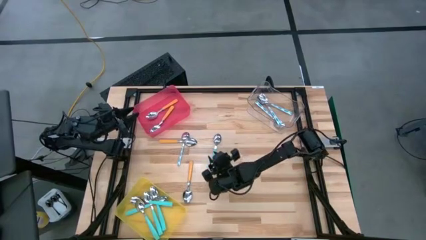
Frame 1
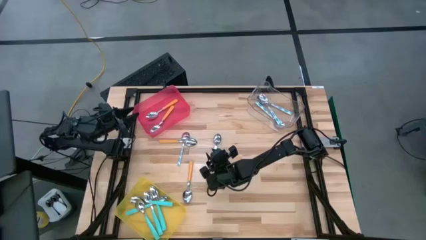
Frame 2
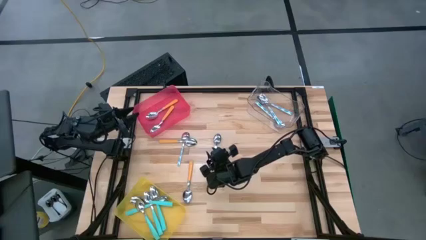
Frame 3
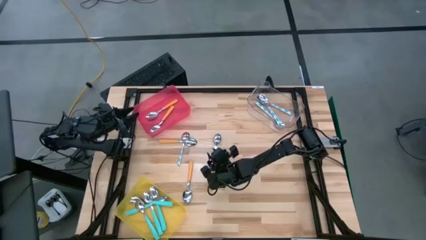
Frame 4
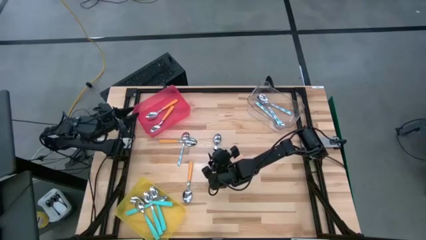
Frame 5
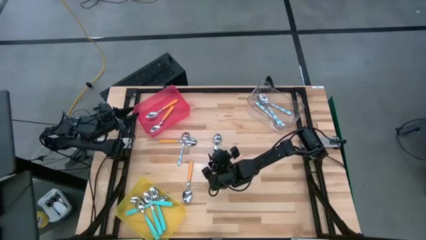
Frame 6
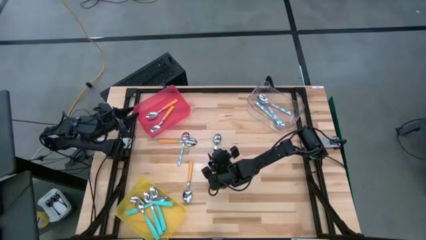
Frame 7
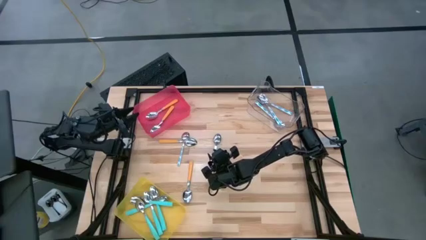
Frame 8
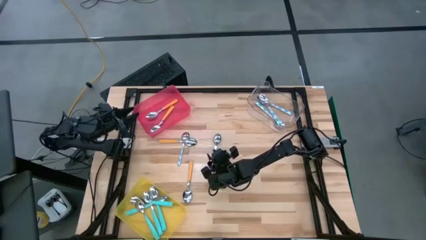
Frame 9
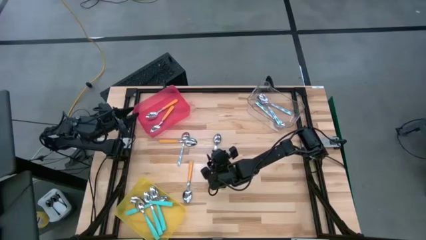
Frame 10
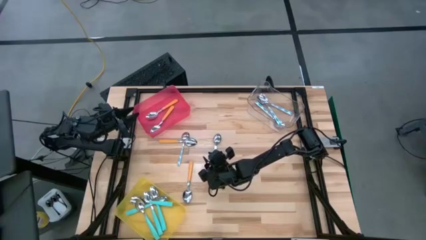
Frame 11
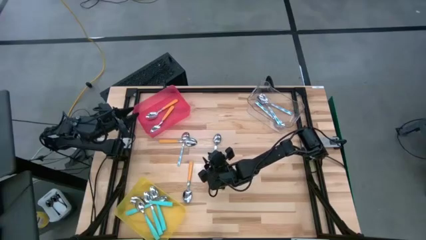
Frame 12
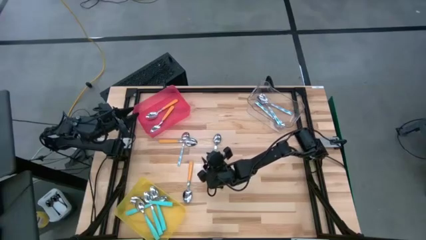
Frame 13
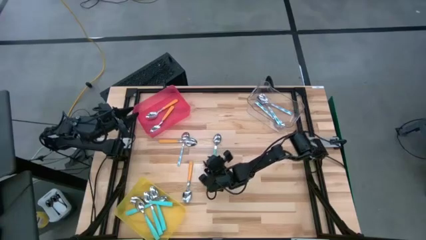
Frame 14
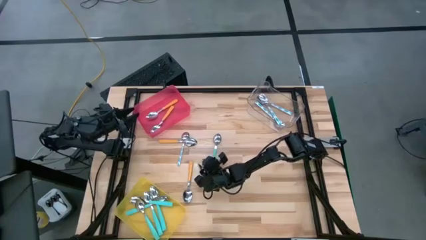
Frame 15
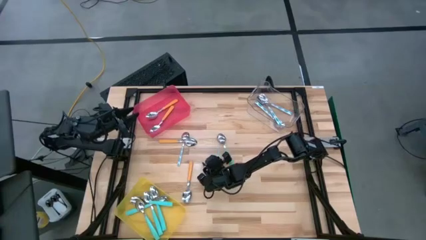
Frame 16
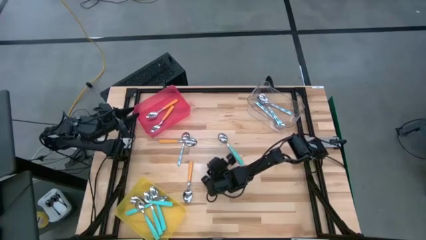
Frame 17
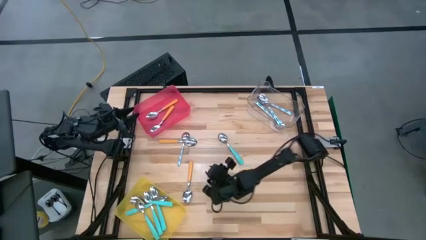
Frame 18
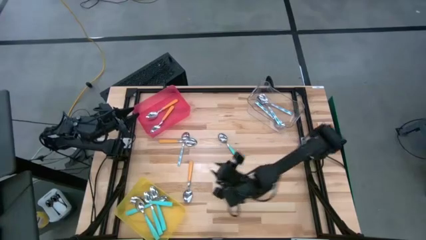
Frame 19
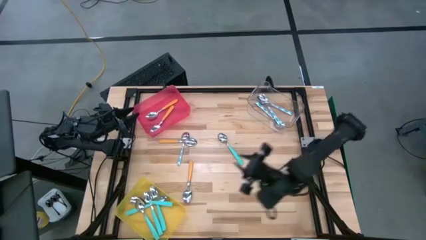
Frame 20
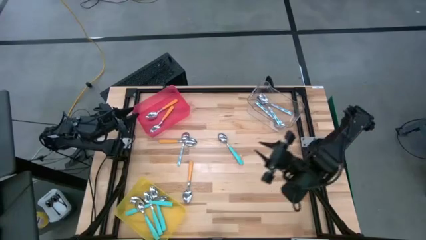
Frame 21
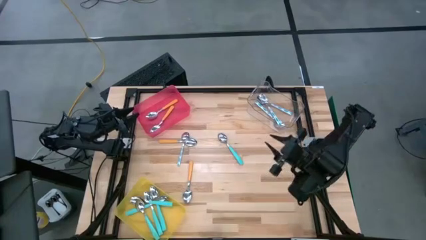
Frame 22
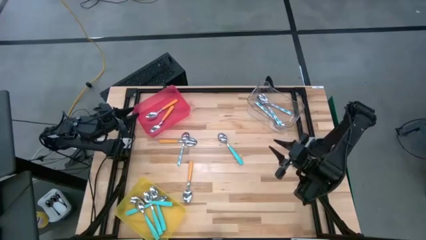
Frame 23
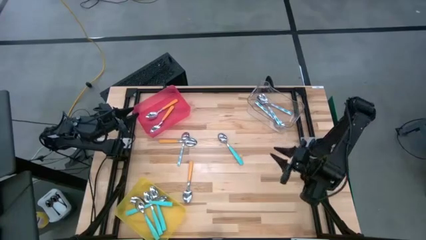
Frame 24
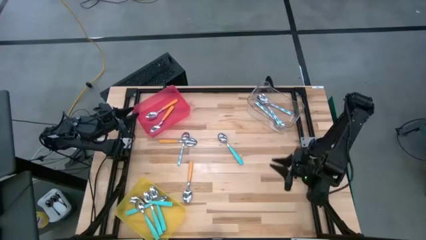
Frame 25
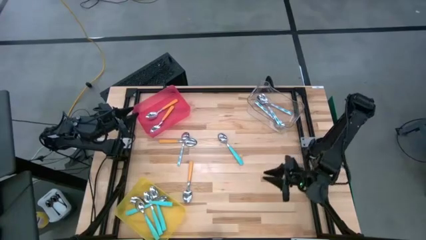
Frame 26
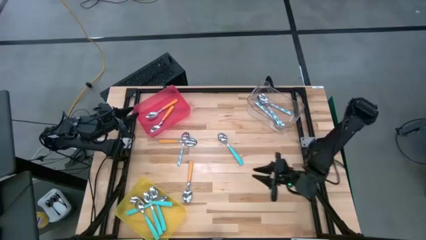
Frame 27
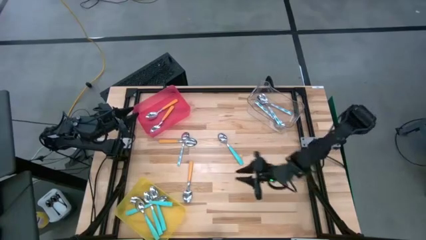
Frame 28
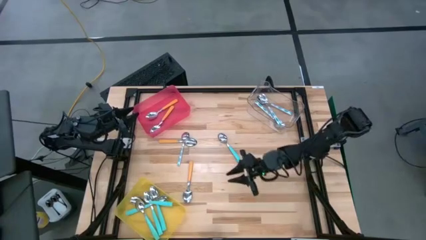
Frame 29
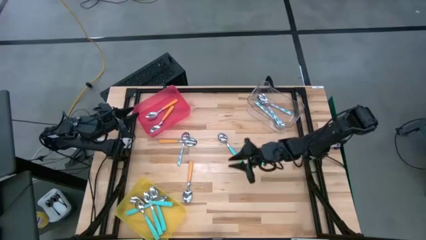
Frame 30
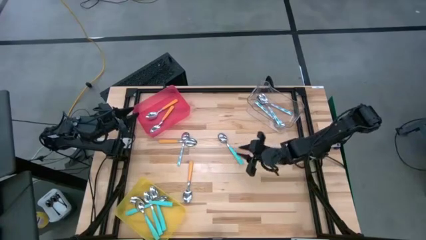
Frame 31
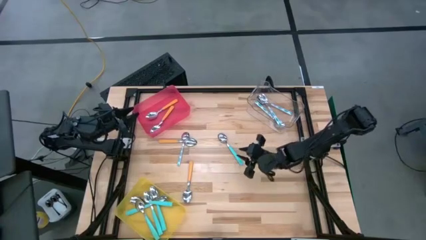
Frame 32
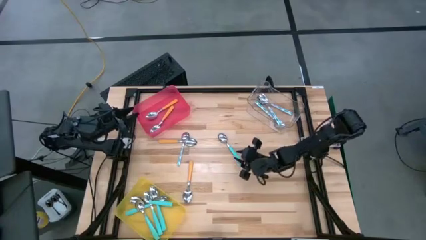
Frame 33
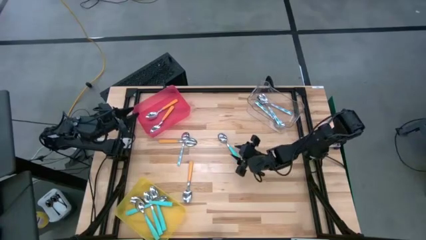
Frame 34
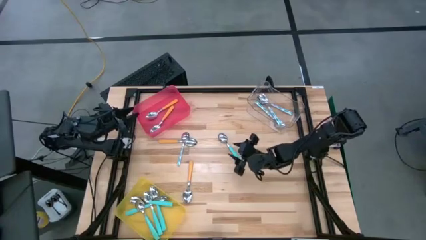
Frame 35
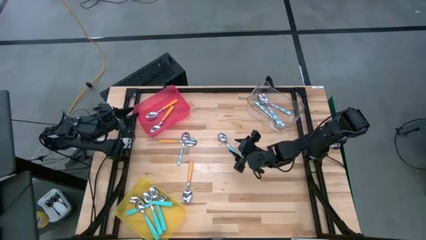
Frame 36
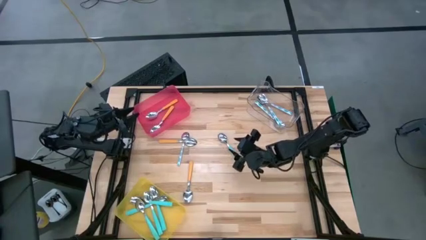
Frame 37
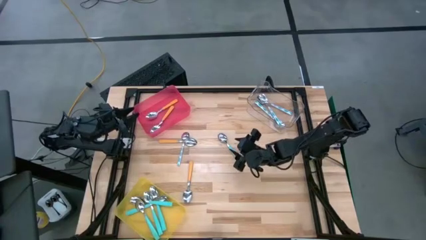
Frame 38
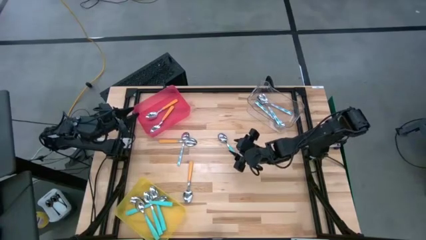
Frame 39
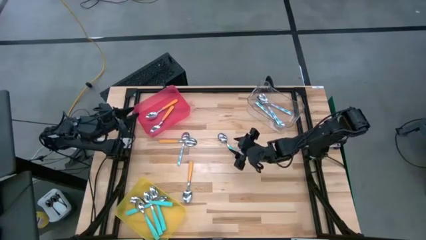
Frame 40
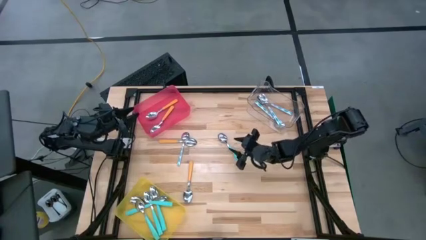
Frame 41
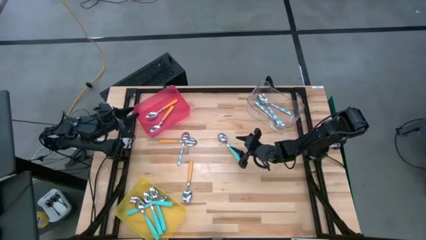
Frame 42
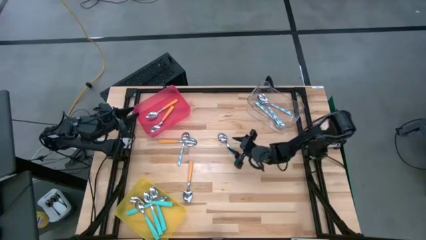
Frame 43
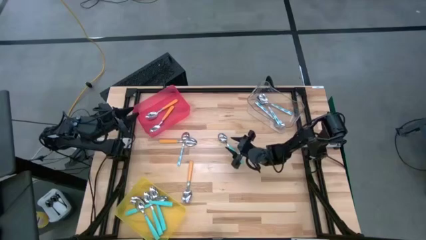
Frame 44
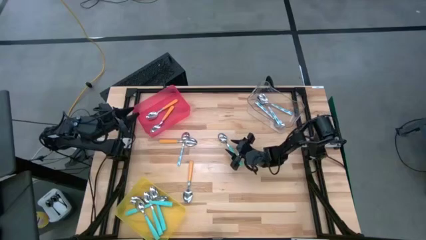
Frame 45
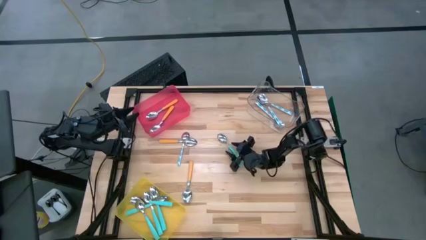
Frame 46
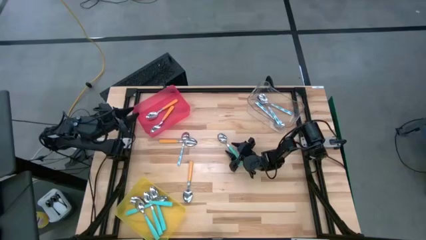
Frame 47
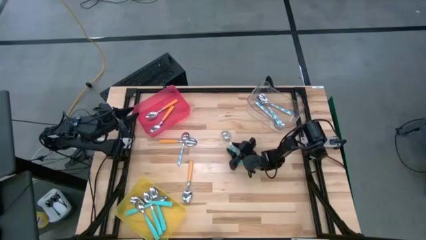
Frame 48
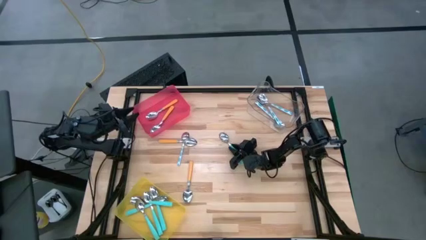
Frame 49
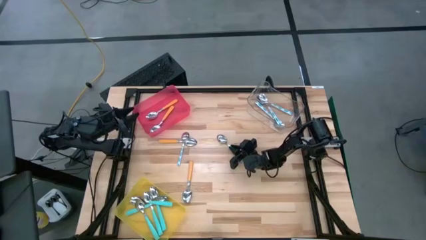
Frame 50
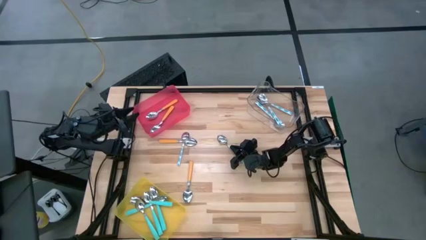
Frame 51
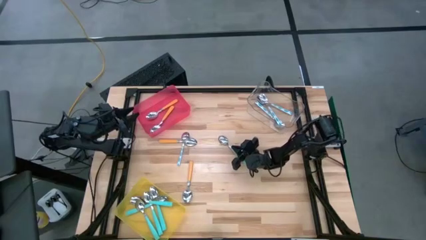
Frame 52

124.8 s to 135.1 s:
Task: Sort silverware by color (type)
Put the light blue spoon into the yellow bin

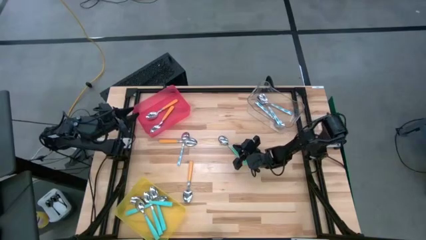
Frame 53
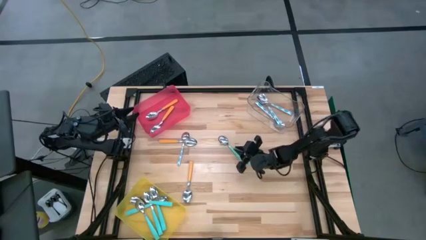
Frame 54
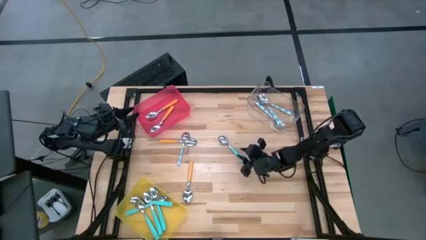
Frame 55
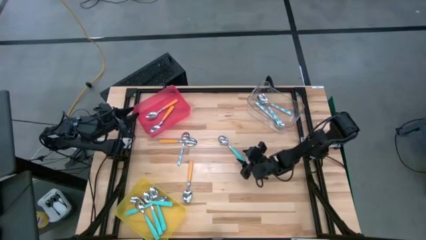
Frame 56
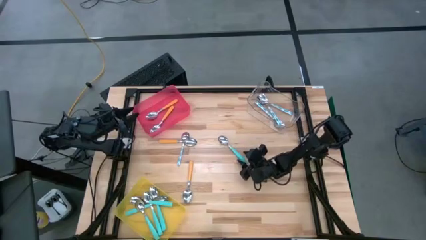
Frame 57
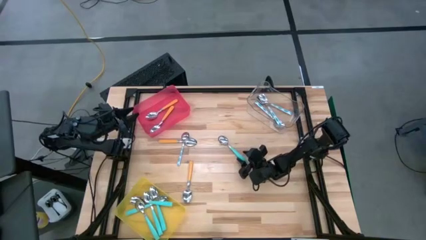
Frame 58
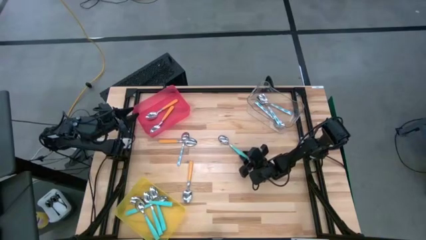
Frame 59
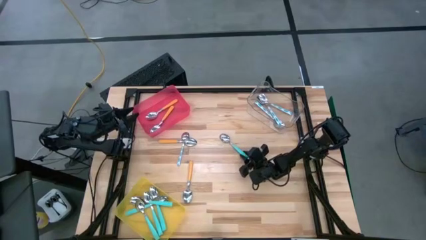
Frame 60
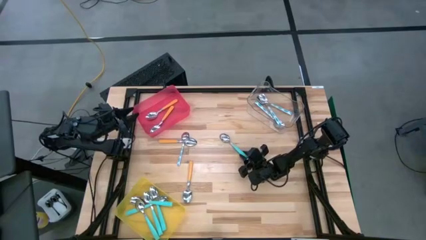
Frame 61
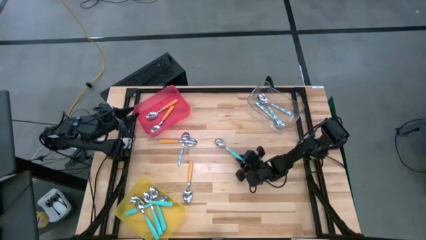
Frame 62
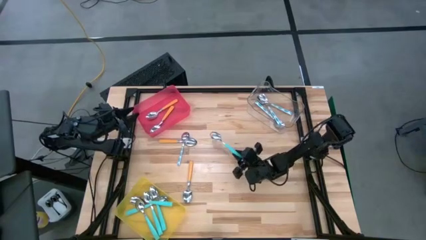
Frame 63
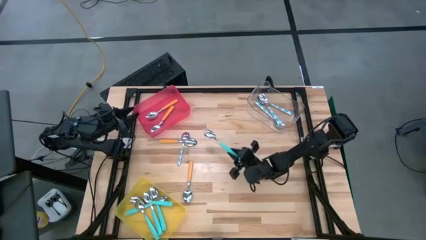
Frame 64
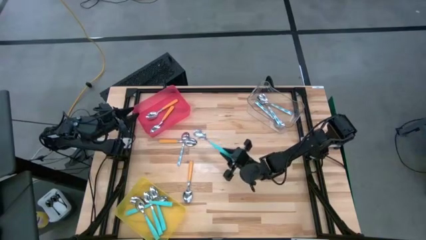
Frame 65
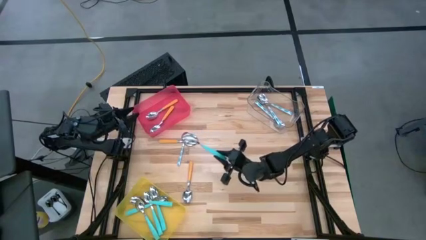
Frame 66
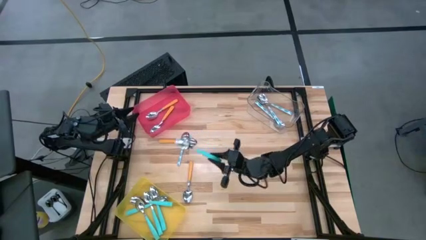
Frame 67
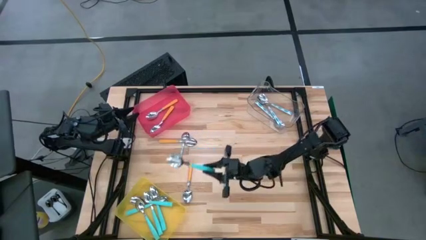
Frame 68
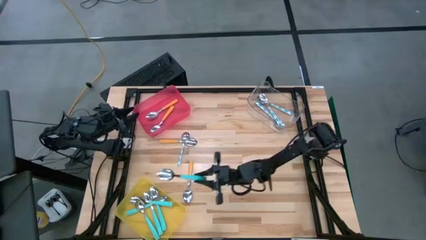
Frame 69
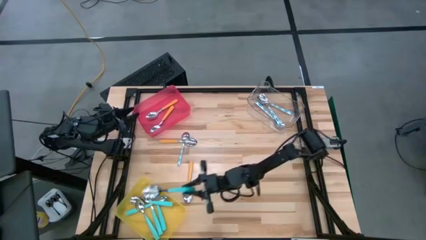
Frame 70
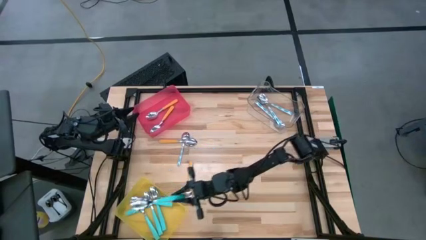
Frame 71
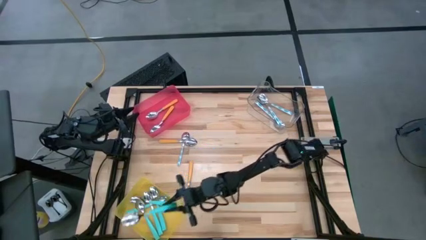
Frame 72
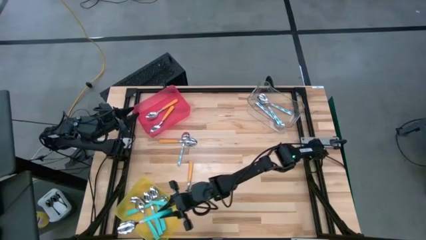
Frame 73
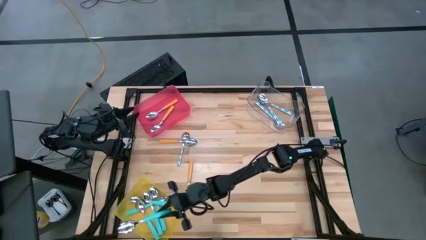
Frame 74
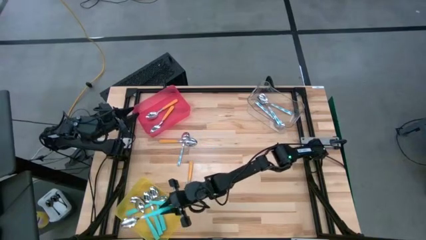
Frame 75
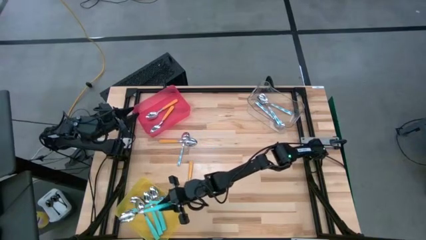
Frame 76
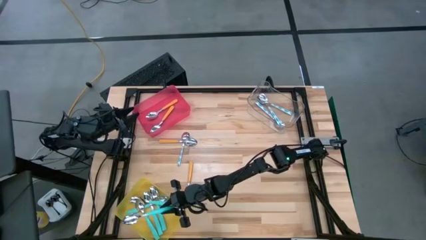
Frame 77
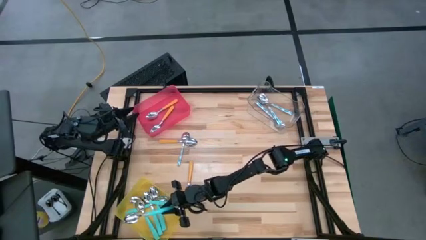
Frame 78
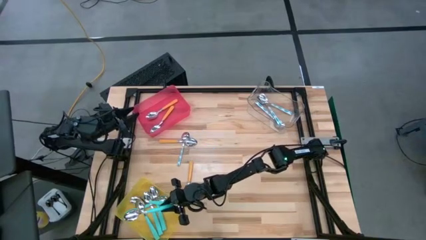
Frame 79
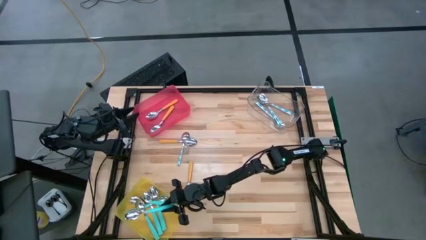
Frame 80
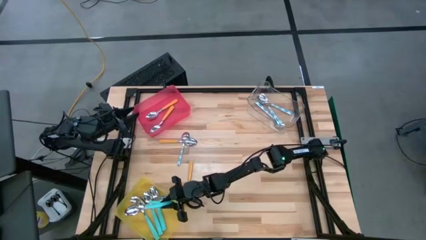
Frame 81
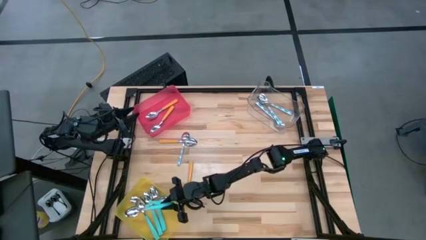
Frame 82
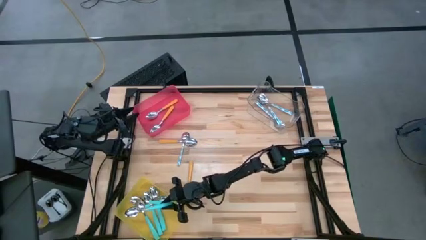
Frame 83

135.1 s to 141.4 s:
Put the light blue spoon into the yellow bin
